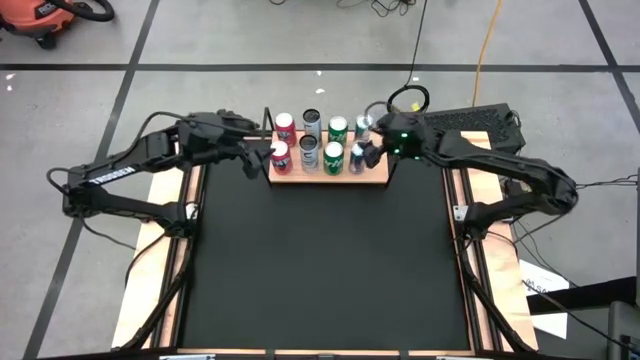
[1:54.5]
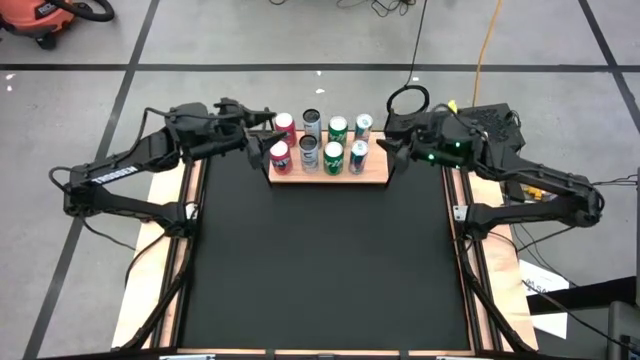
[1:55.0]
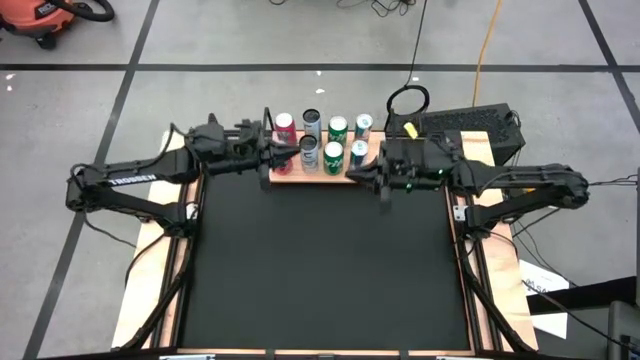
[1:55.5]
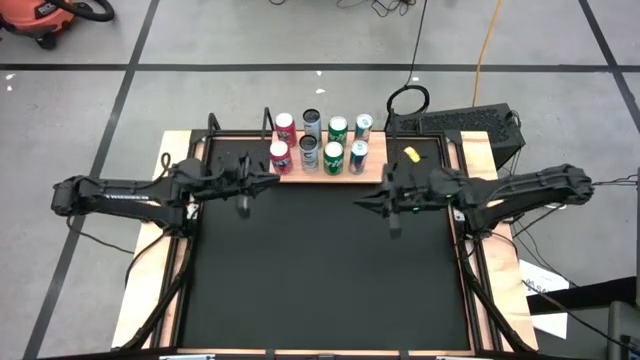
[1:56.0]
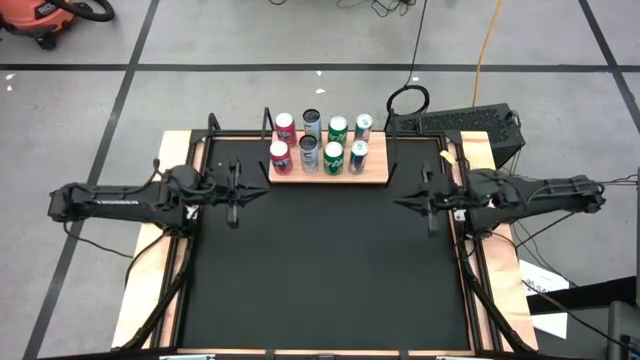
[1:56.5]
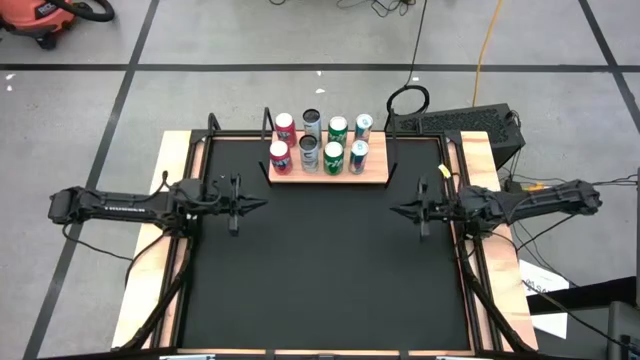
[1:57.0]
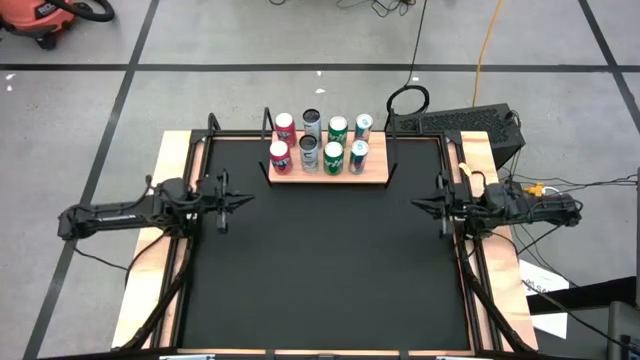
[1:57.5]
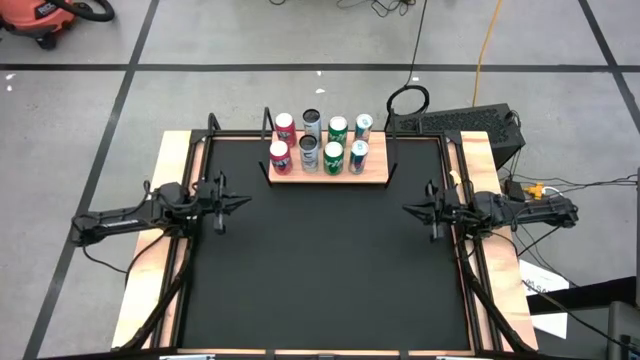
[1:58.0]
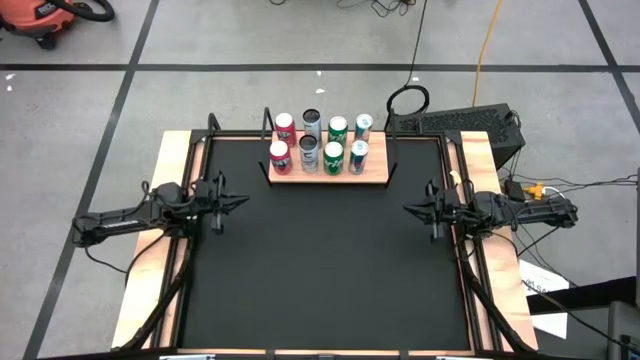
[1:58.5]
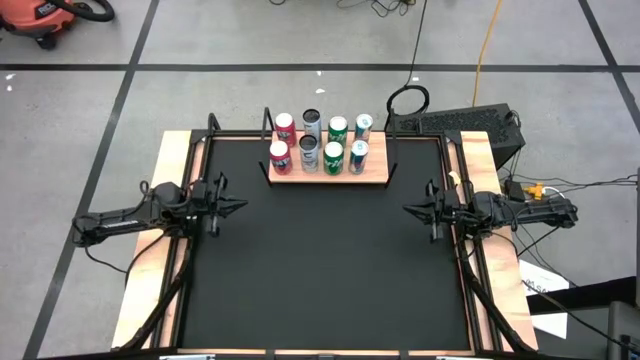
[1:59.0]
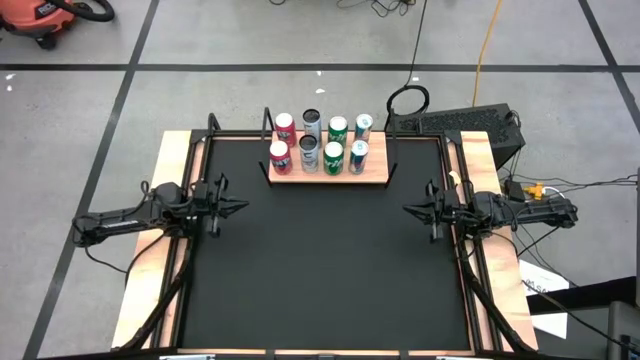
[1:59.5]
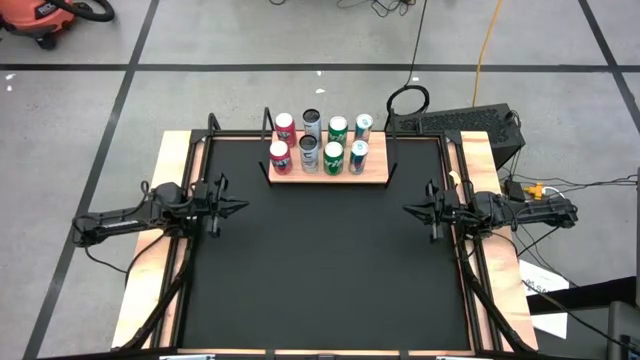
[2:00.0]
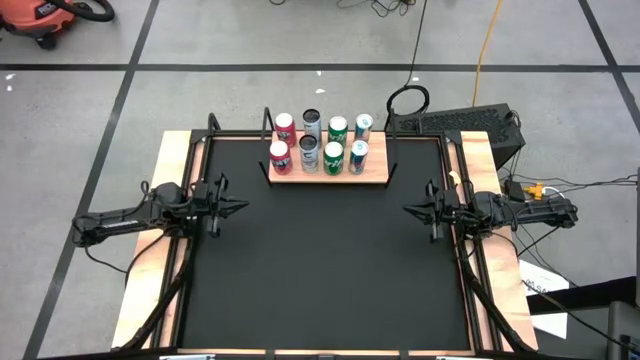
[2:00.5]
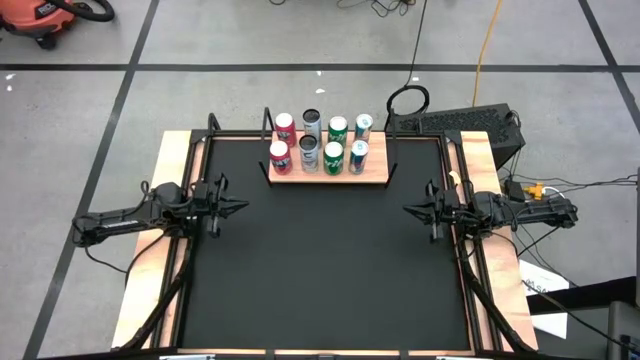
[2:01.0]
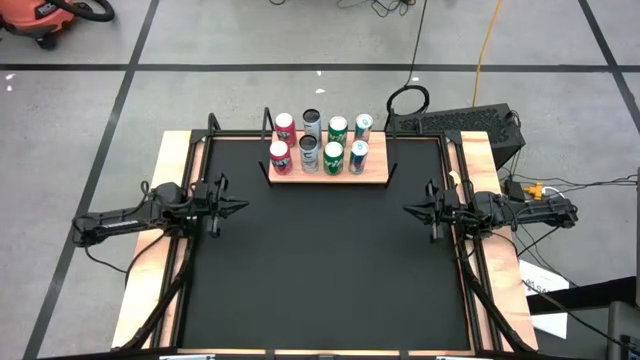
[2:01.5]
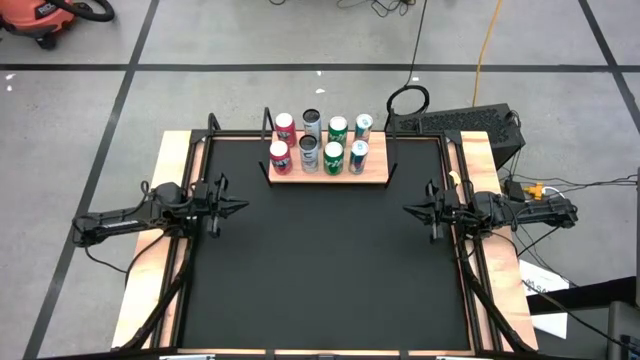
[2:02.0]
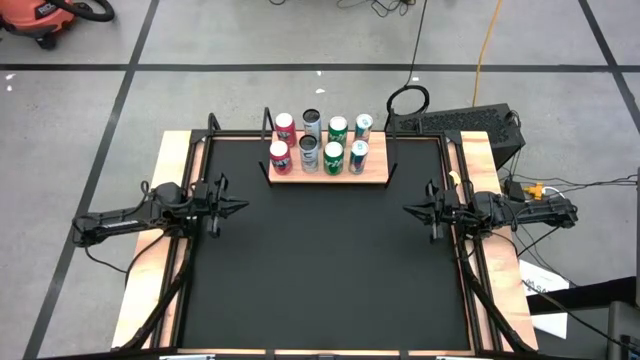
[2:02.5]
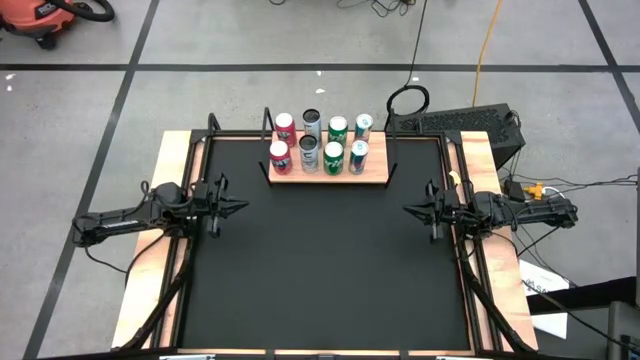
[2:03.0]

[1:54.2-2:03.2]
Task: Place canned beverage on shelf
Return to Home Position

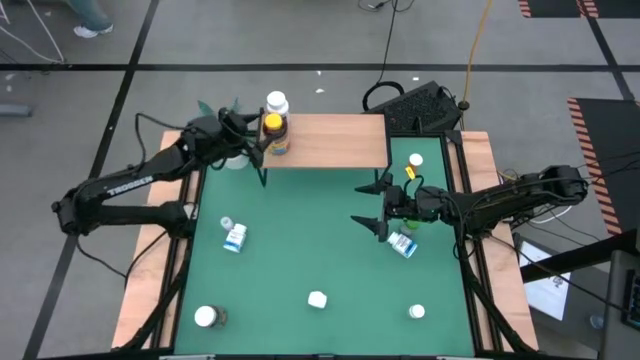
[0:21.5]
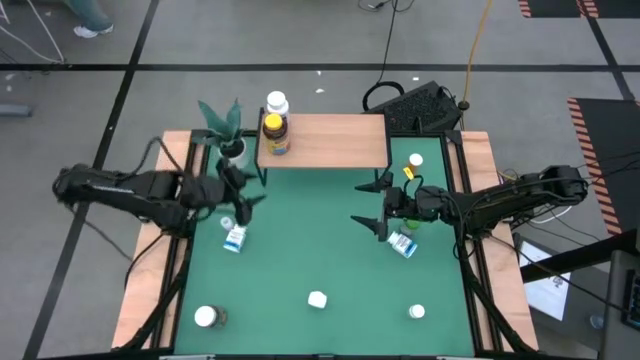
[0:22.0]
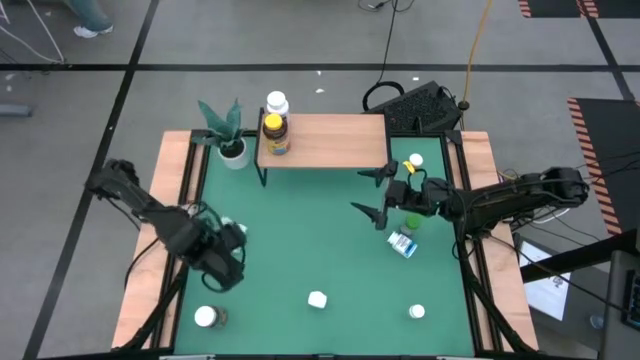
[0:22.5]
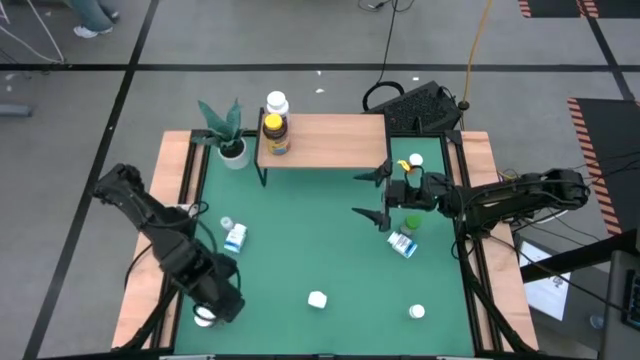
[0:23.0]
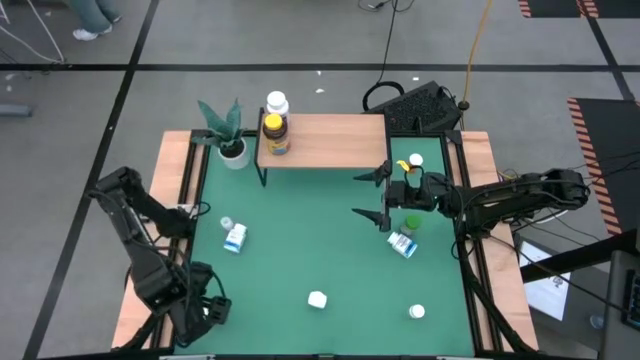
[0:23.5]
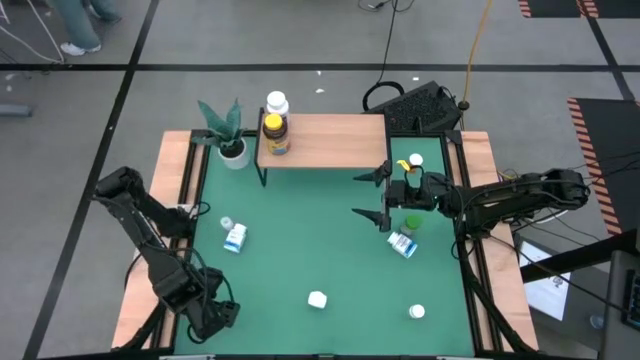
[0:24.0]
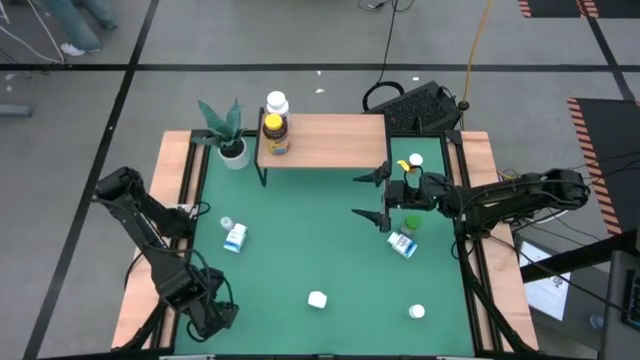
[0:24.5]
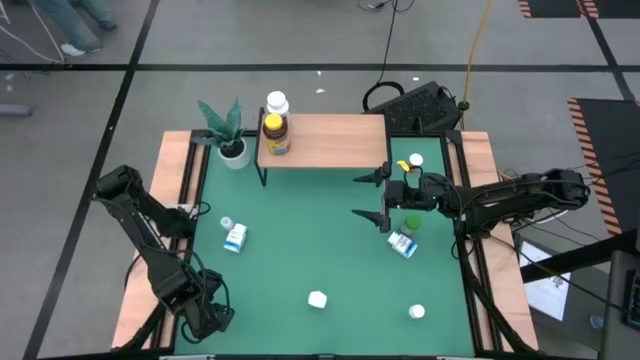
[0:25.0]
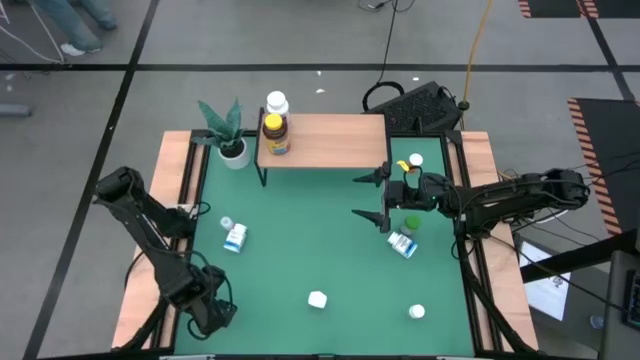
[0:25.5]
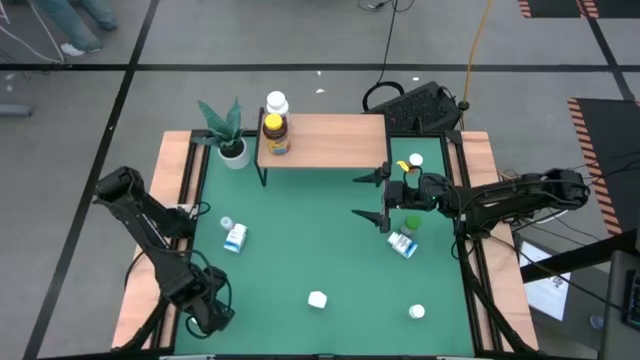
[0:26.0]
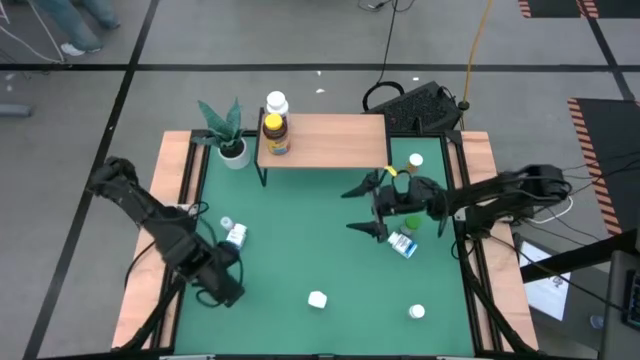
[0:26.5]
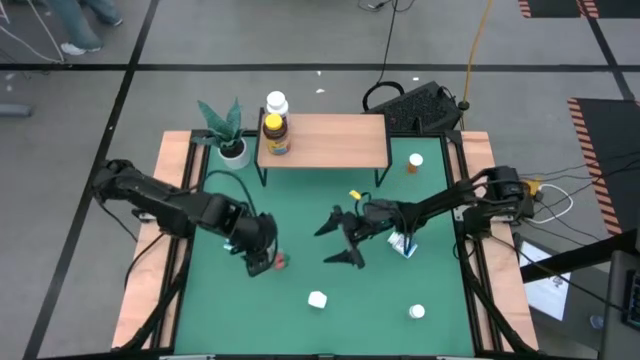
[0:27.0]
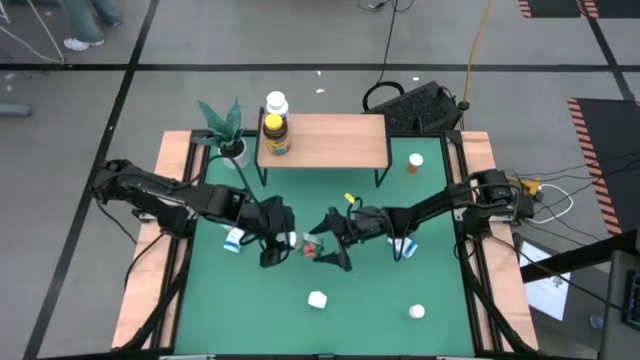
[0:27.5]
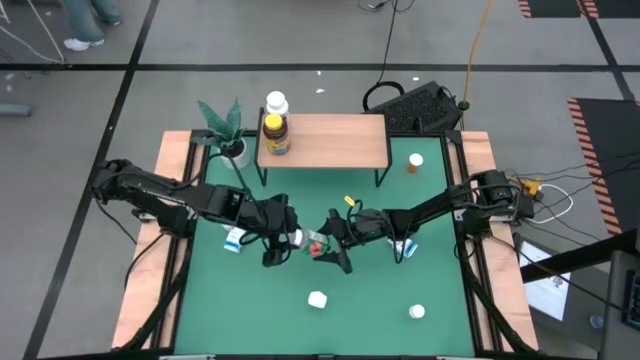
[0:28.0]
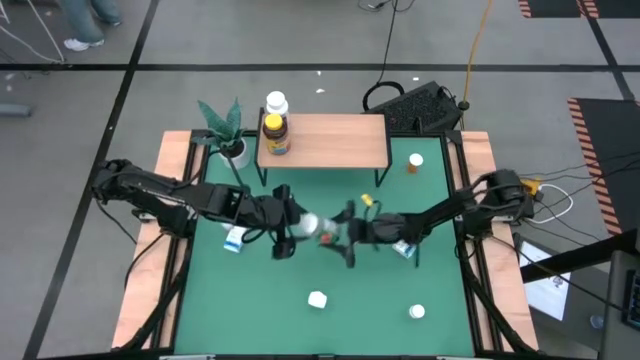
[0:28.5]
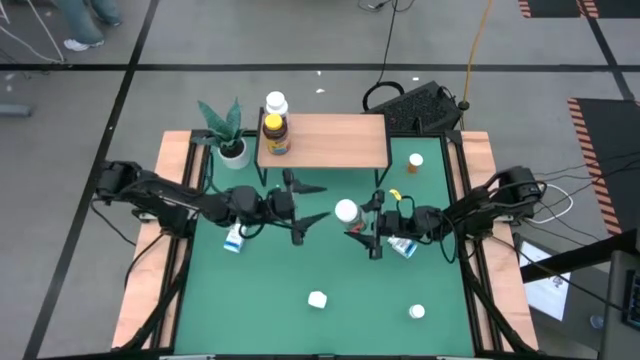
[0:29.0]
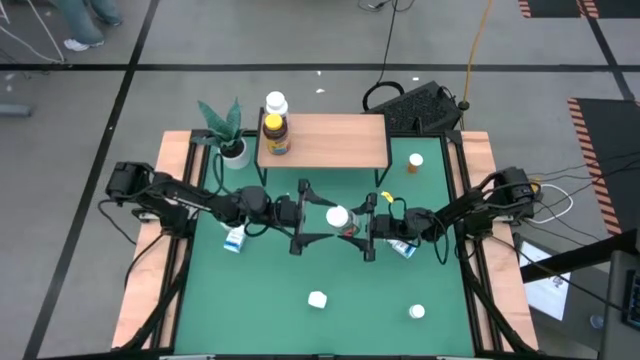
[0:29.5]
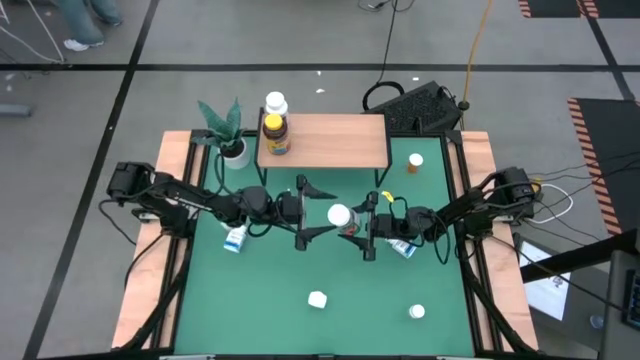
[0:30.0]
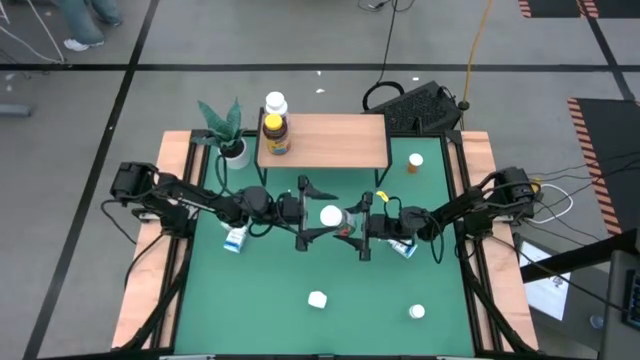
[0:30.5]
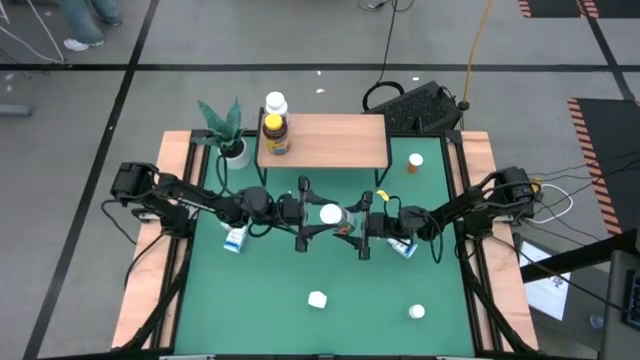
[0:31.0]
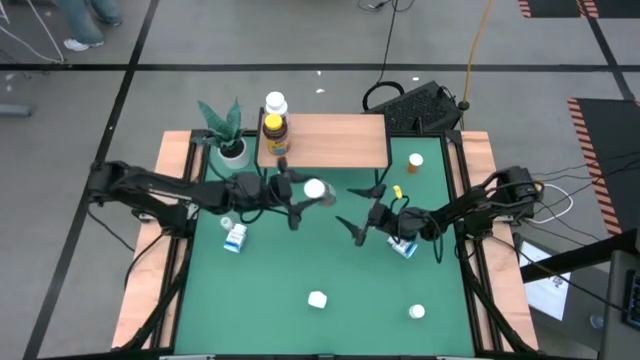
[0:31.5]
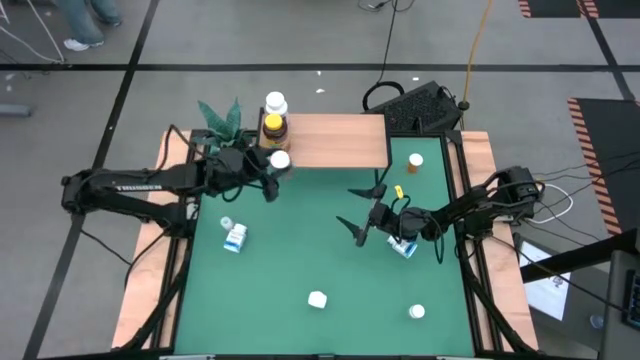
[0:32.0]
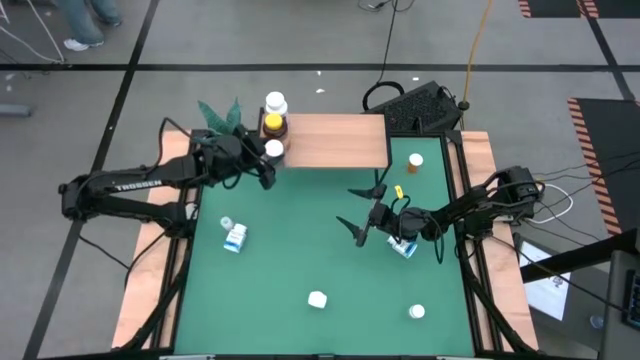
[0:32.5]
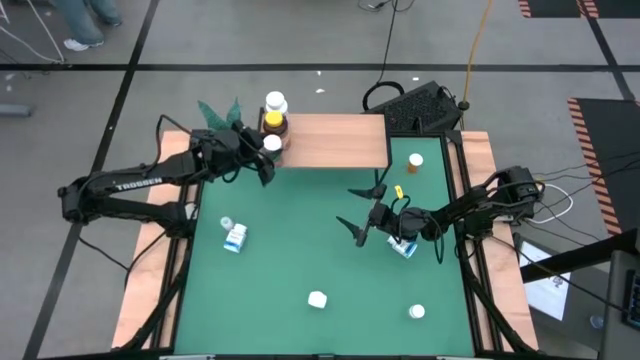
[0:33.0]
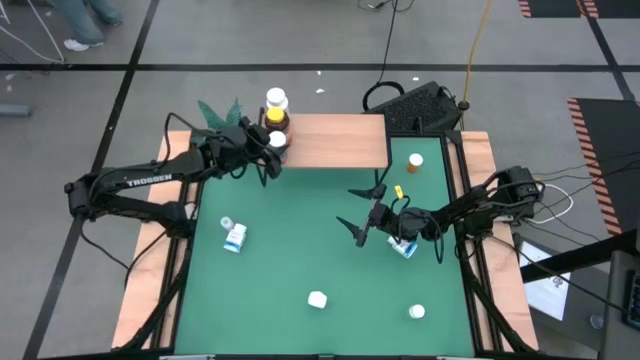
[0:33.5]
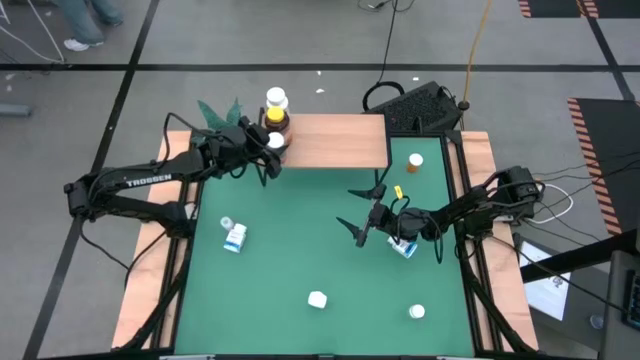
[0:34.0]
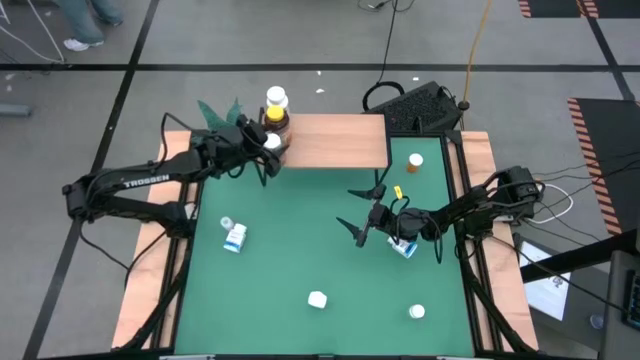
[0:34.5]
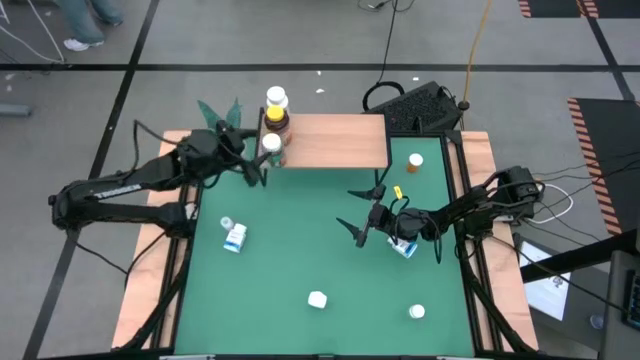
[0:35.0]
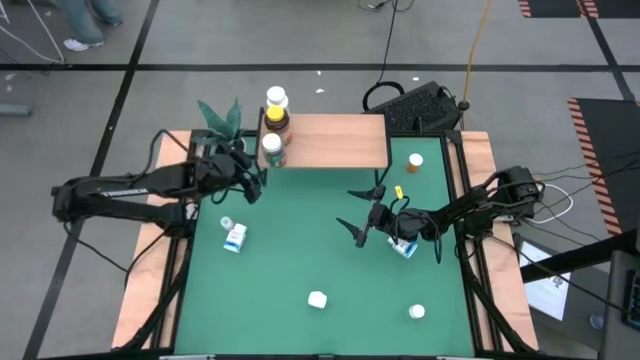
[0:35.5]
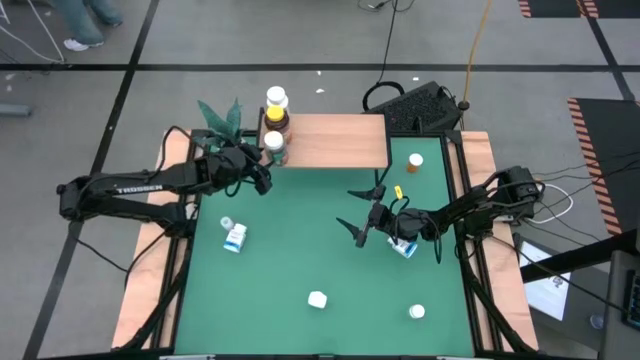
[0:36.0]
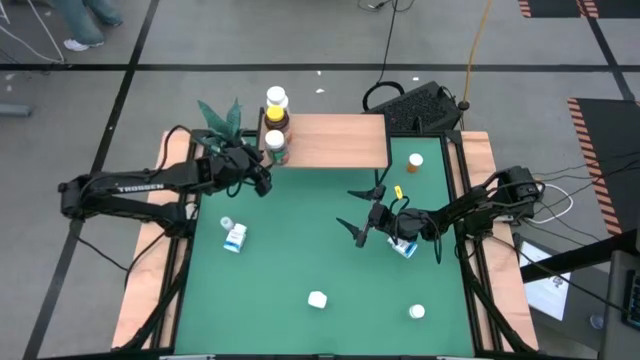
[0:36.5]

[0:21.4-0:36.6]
Task: Pick and place medicine bottles onto shelf by color
Put the white green pill bottle on the shelf aligned with the big yellow pill bottle
